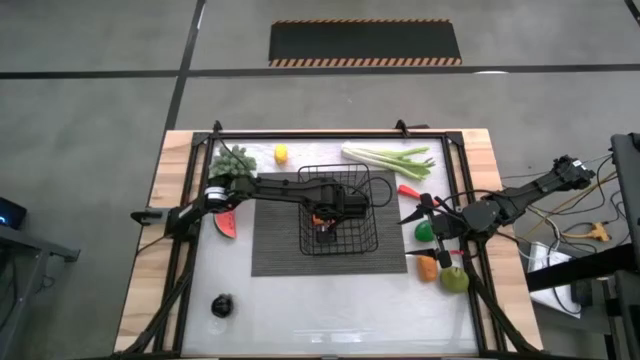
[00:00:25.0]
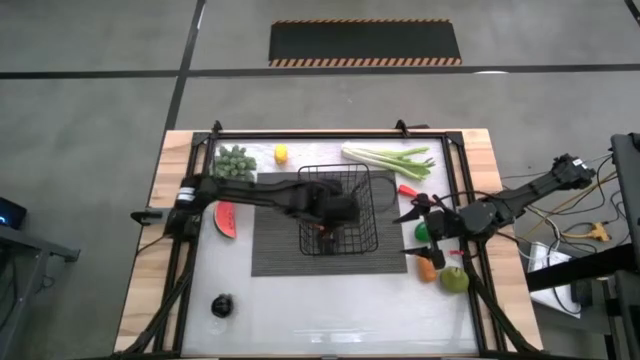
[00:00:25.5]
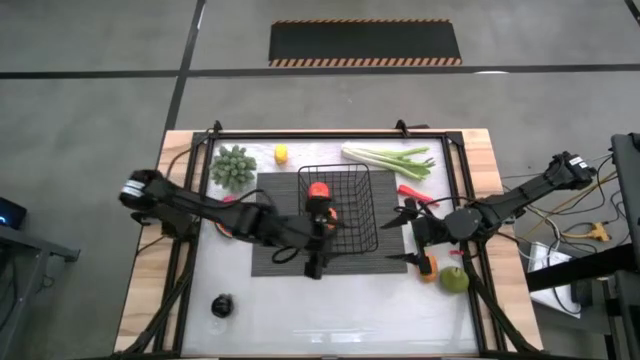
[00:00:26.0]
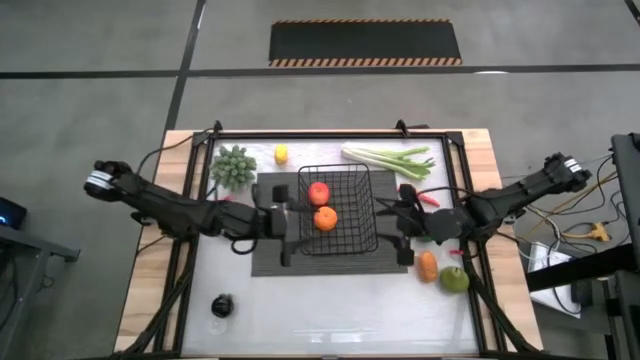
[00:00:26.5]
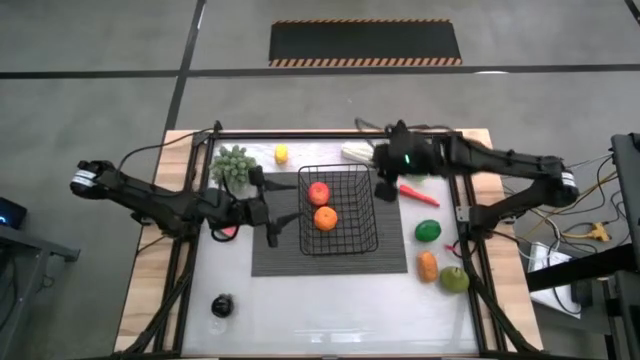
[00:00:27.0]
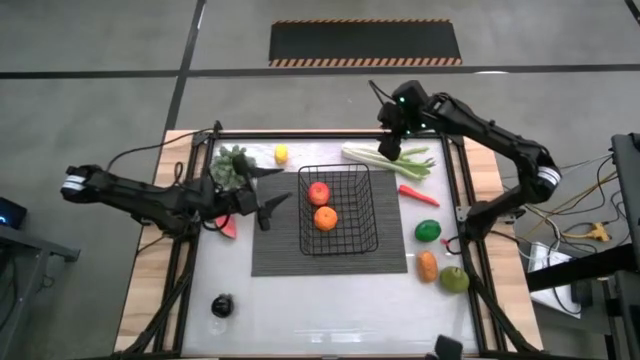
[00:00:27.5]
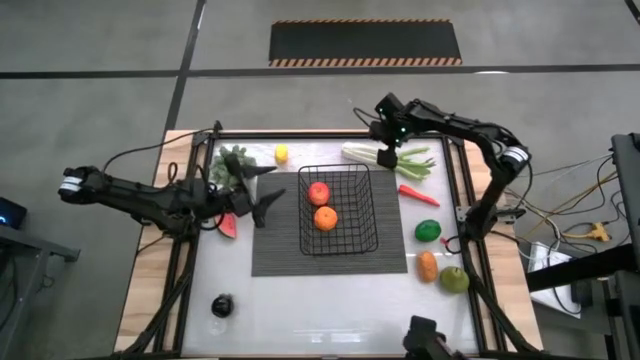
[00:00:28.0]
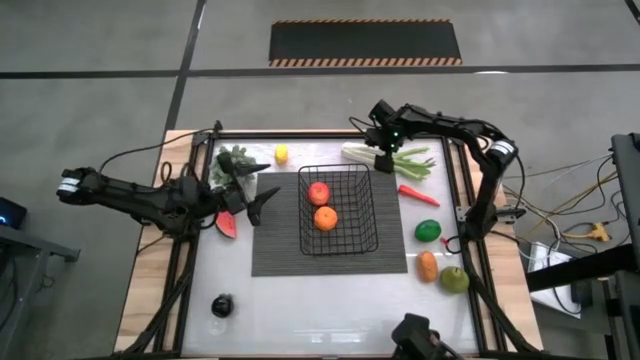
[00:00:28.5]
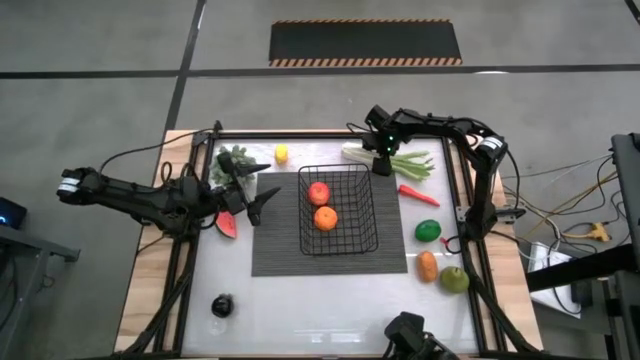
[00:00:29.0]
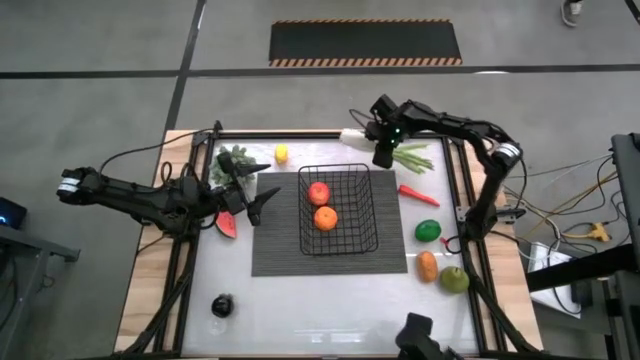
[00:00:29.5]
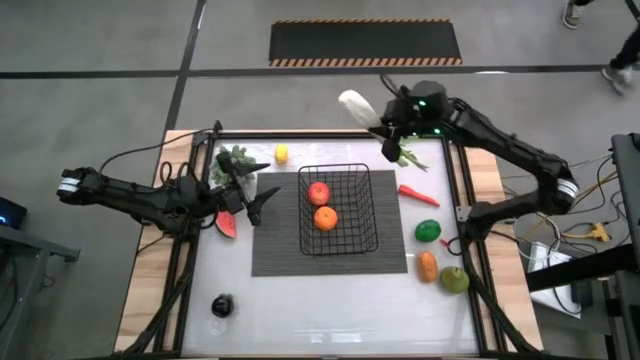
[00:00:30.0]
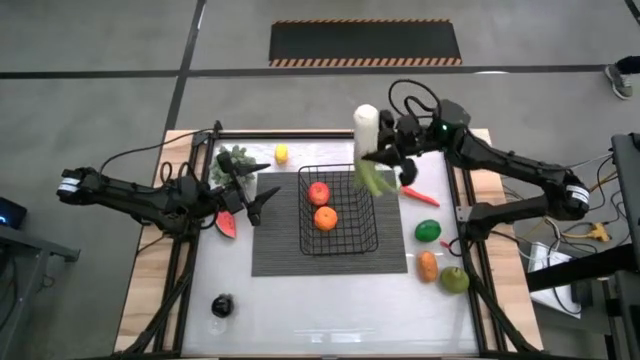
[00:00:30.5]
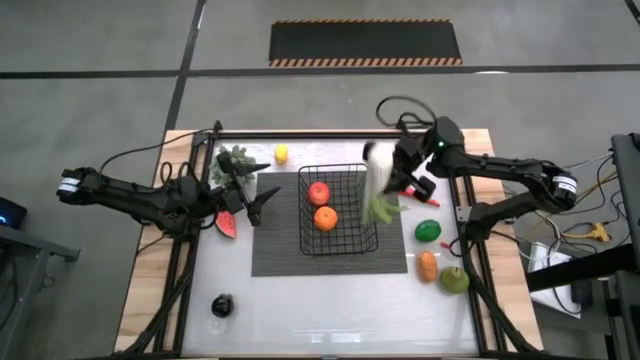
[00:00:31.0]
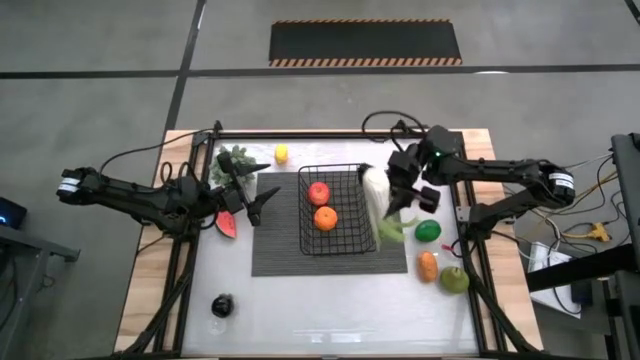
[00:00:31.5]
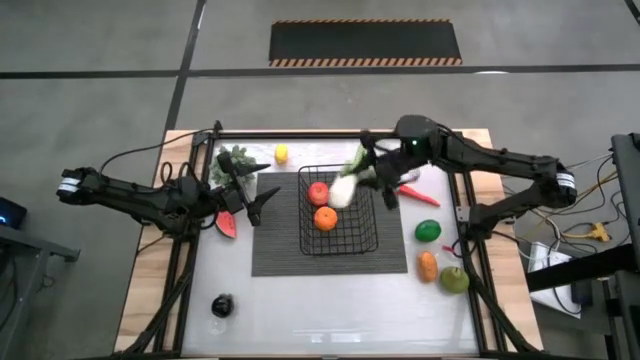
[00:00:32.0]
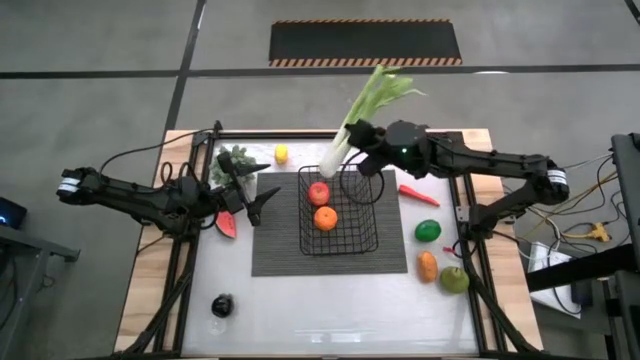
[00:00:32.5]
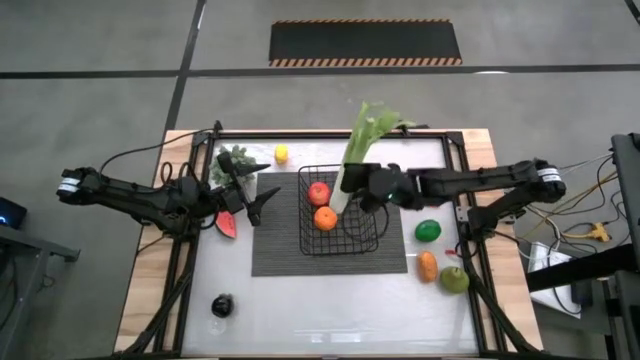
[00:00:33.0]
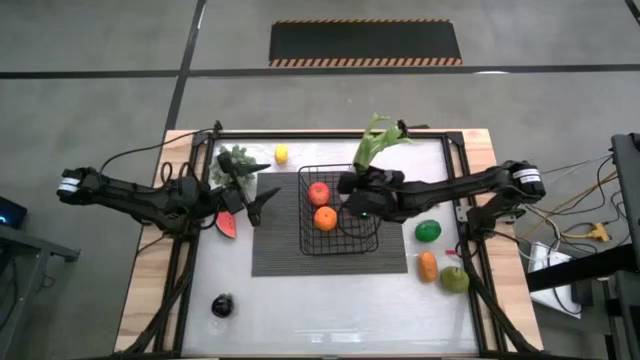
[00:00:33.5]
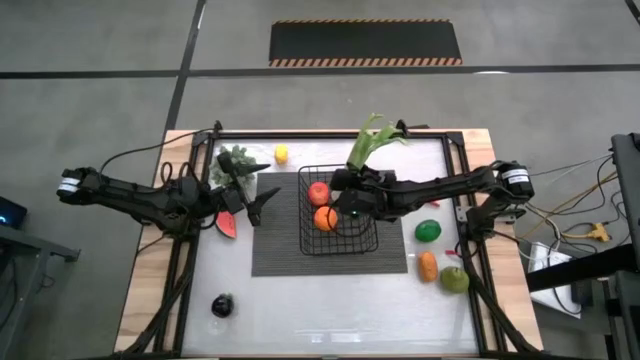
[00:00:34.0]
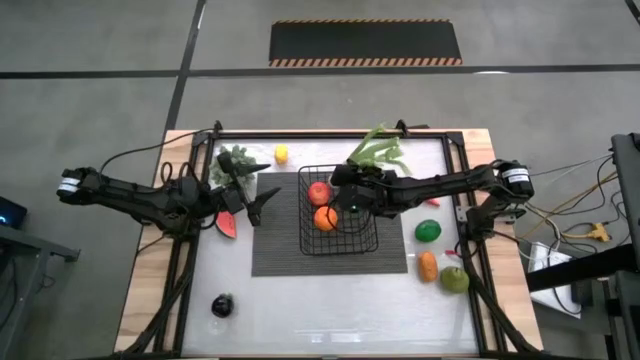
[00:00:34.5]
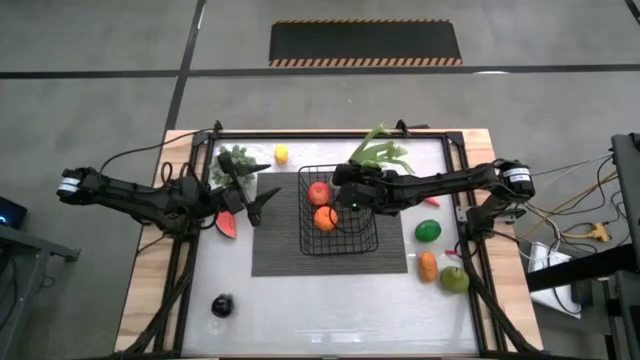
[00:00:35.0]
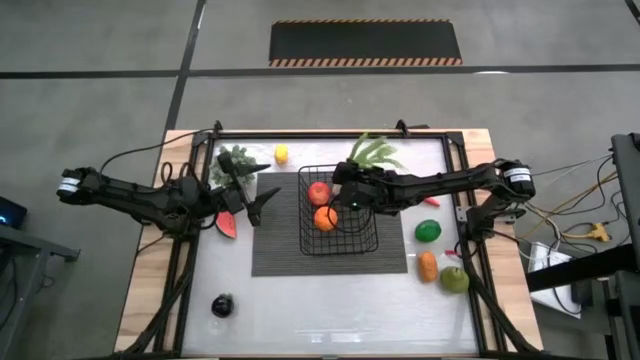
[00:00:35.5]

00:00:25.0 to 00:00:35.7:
Task: Build produce basket
Put the leek into the wire basket

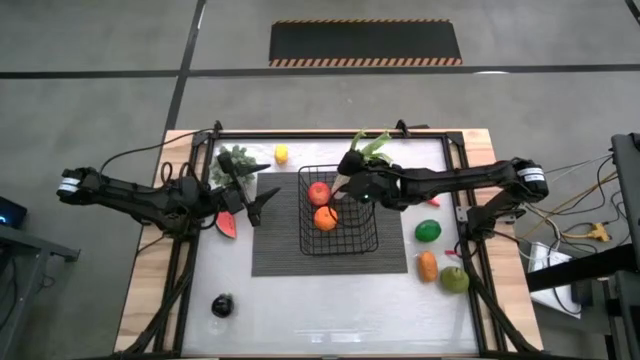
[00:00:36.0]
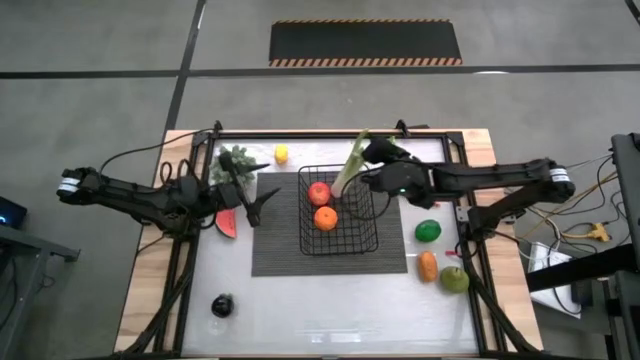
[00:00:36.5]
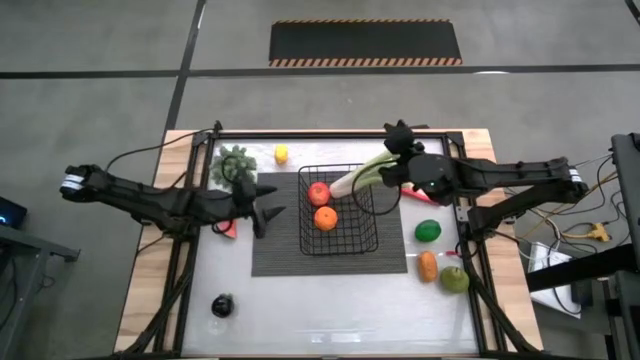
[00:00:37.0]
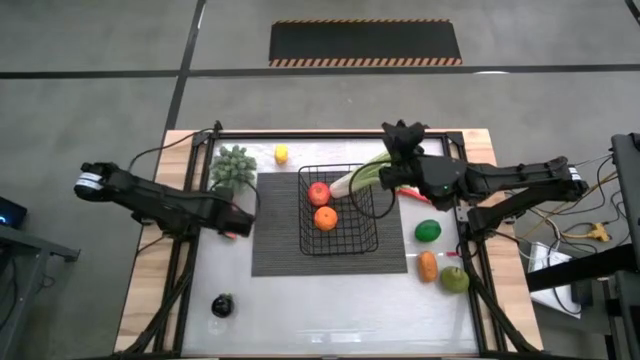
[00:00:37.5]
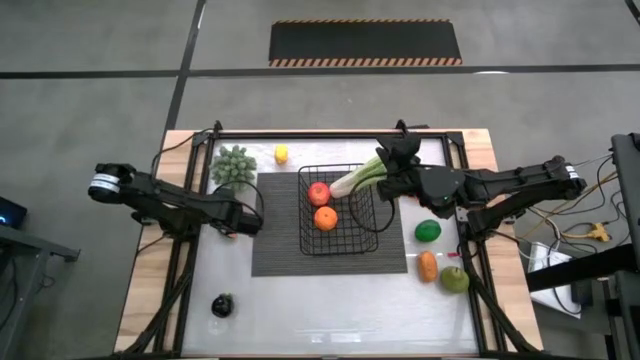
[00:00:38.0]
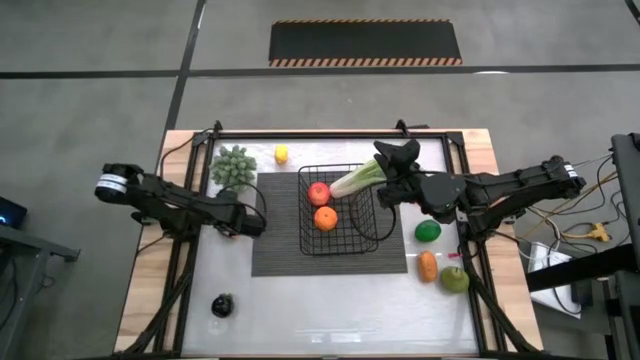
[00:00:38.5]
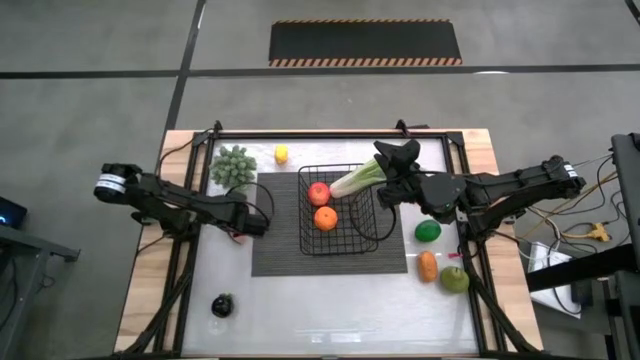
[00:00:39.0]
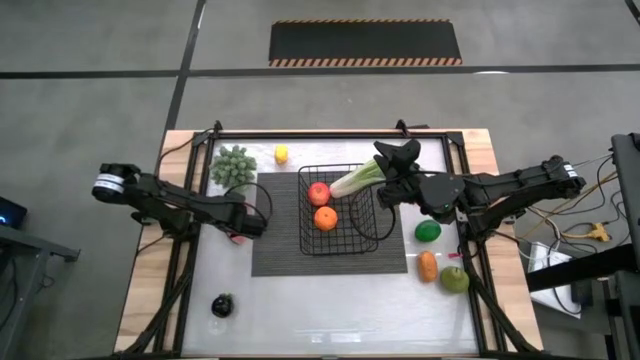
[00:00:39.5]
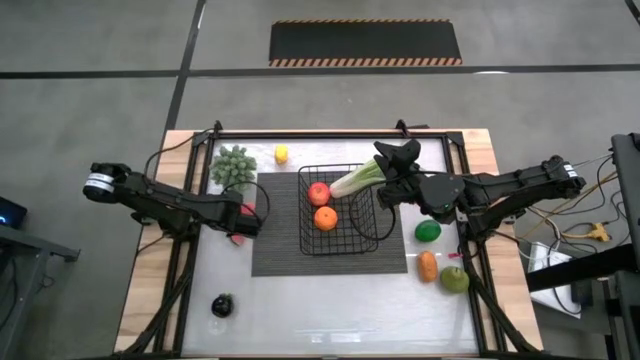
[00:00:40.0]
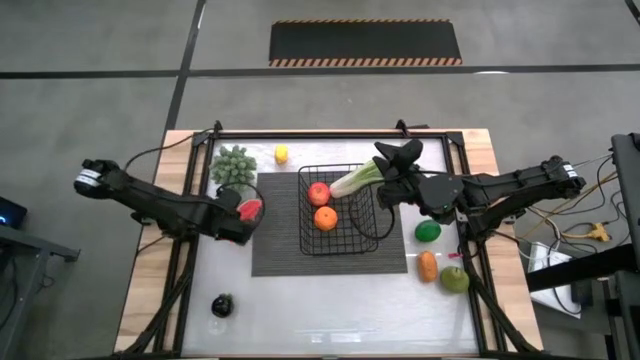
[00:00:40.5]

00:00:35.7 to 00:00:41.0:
Put the watermelon into the wire basket

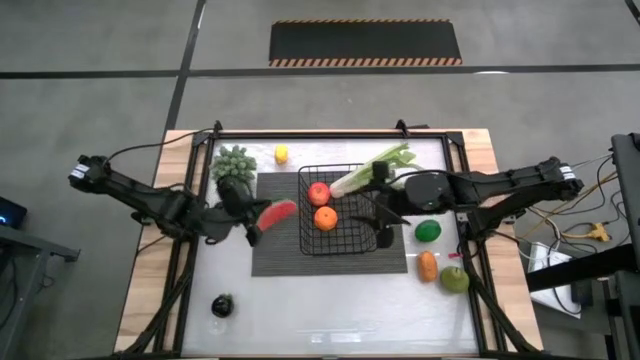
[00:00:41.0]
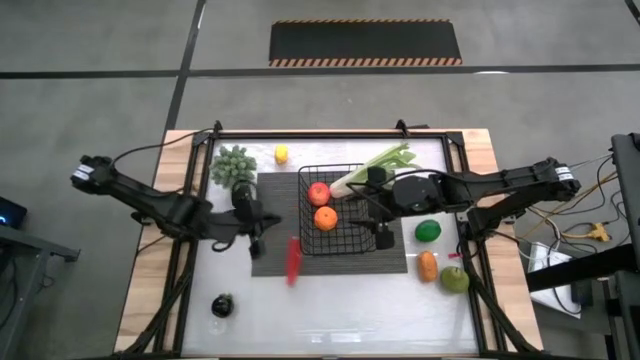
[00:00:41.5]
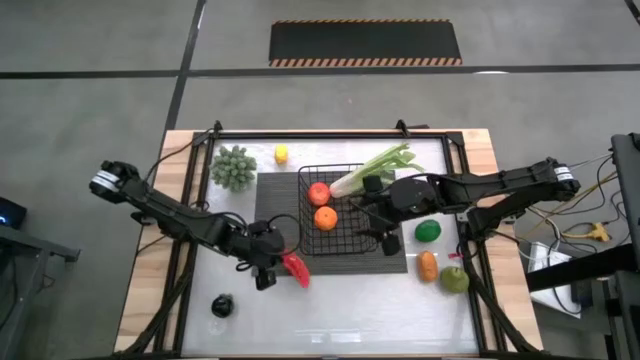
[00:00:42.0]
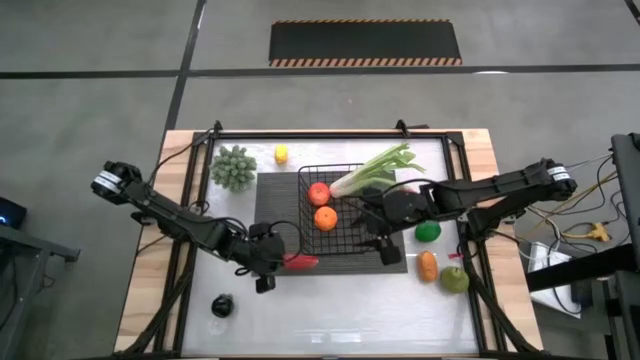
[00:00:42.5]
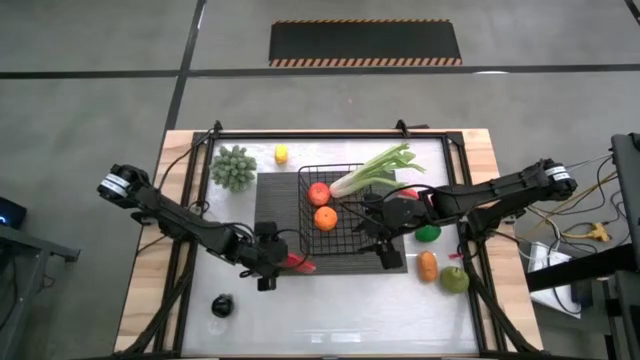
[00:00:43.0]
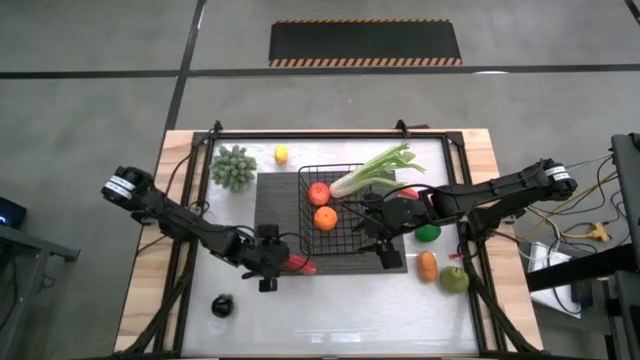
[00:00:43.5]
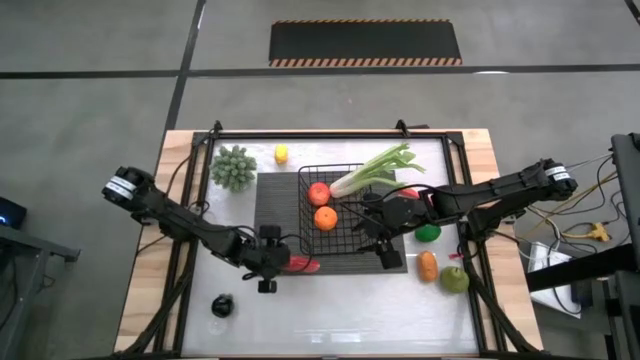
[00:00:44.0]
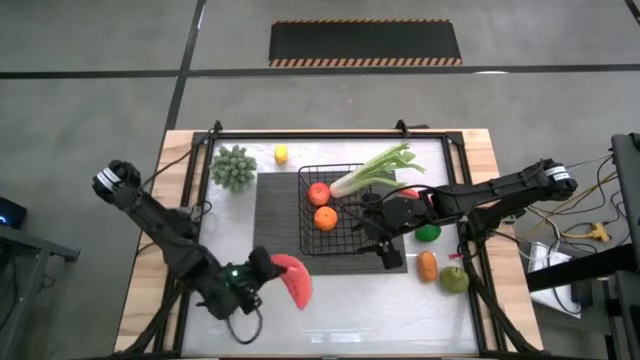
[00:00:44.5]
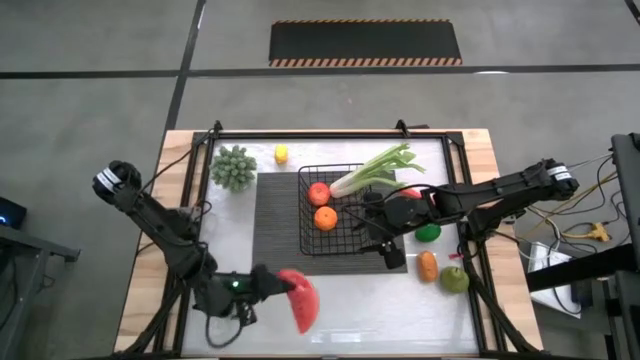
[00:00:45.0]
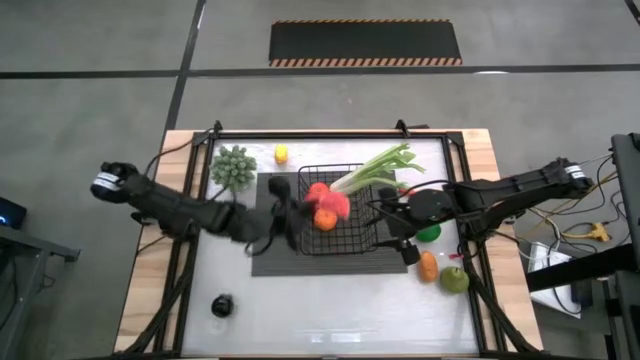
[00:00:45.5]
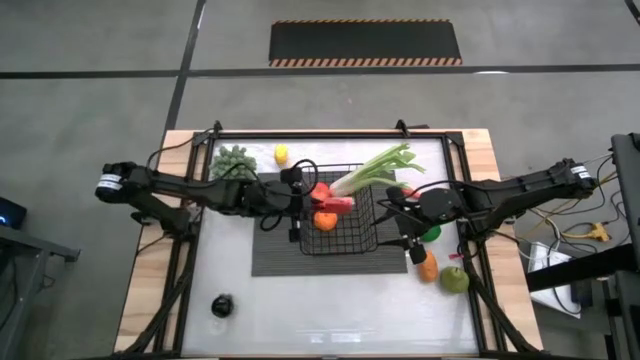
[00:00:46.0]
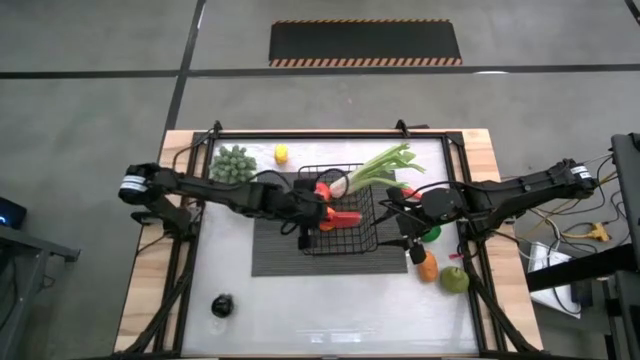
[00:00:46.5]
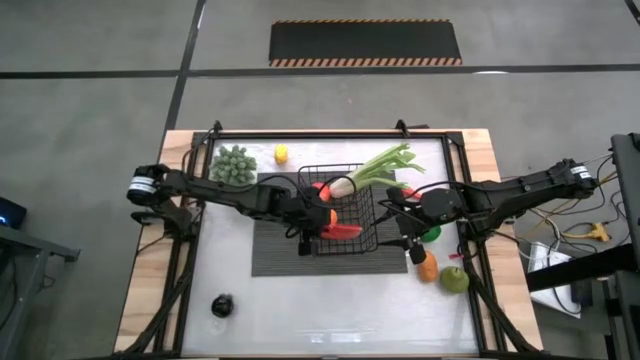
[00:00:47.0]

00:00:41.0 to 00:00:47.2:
Put the watermelon into the wire basket
